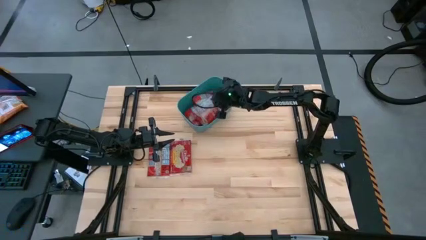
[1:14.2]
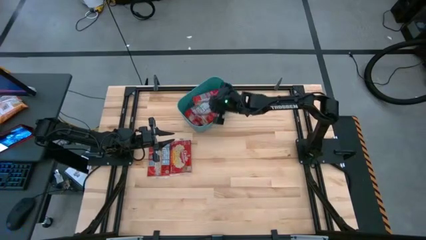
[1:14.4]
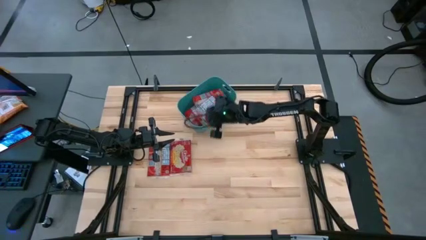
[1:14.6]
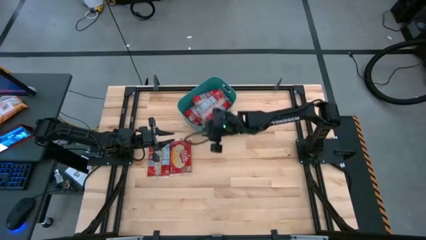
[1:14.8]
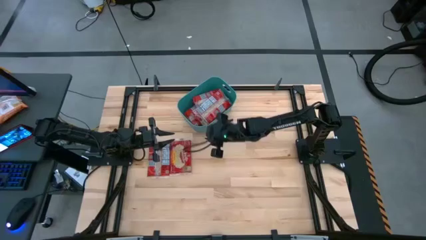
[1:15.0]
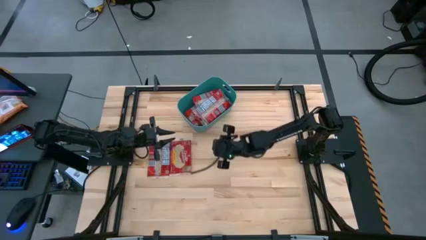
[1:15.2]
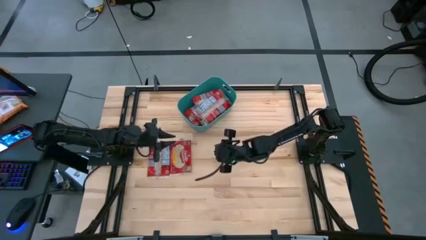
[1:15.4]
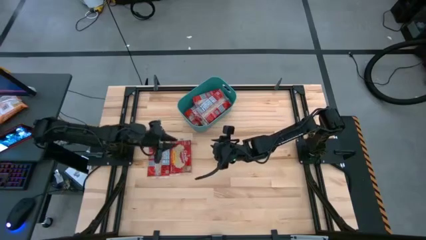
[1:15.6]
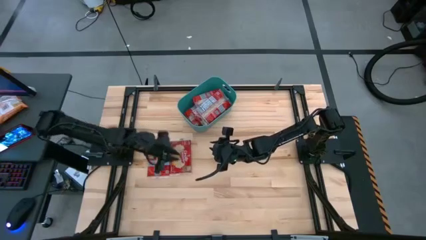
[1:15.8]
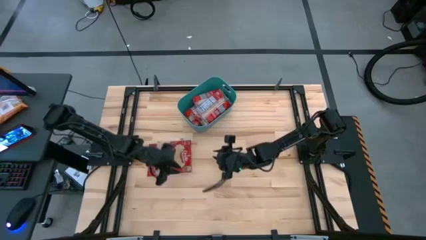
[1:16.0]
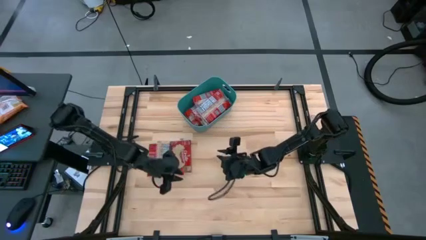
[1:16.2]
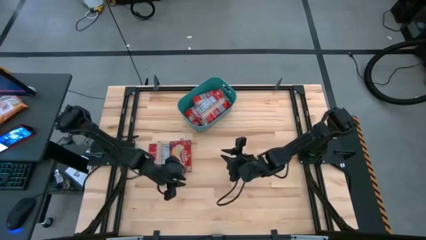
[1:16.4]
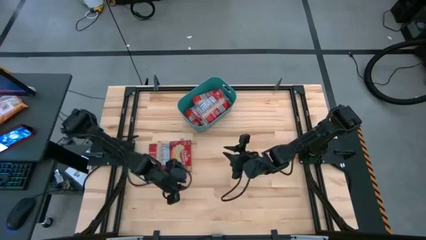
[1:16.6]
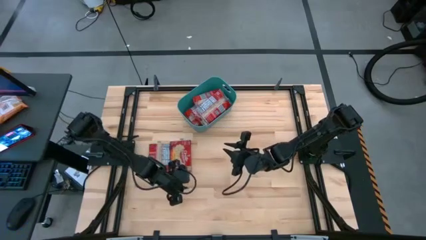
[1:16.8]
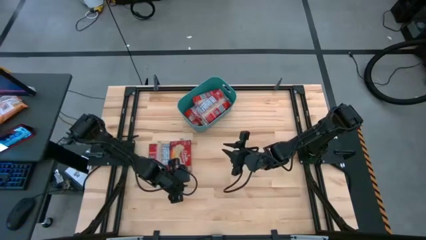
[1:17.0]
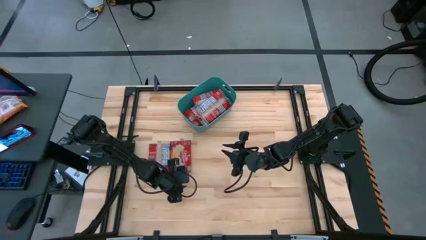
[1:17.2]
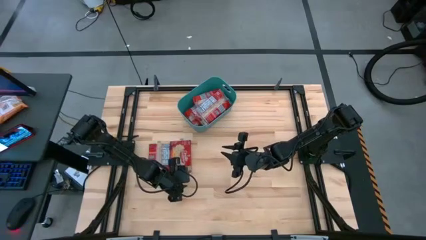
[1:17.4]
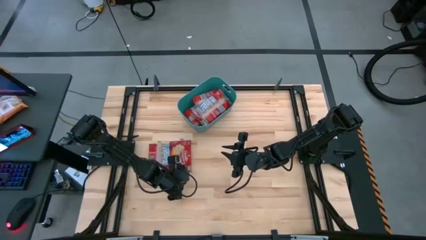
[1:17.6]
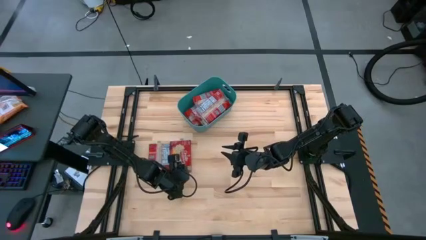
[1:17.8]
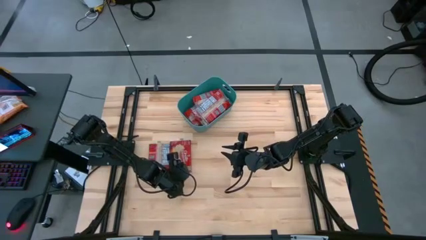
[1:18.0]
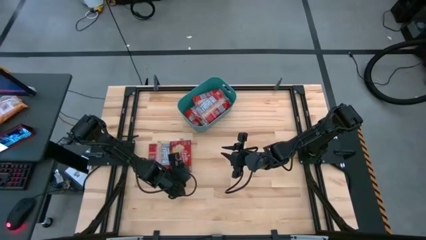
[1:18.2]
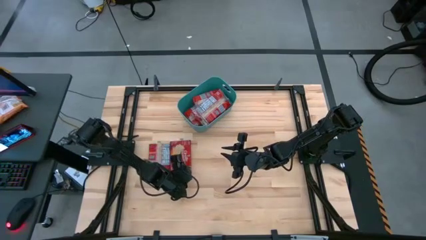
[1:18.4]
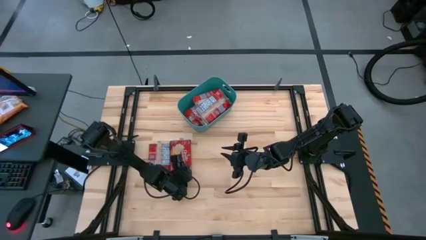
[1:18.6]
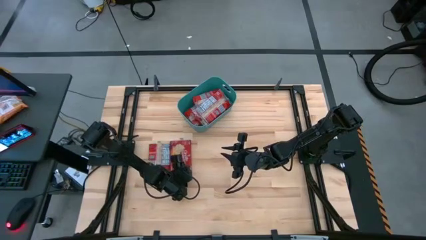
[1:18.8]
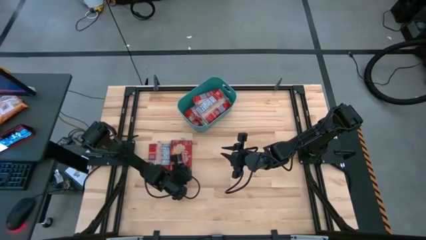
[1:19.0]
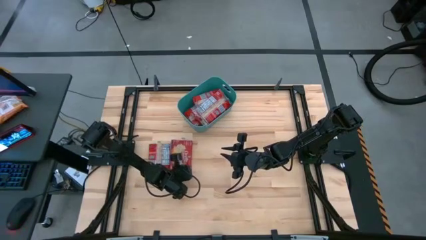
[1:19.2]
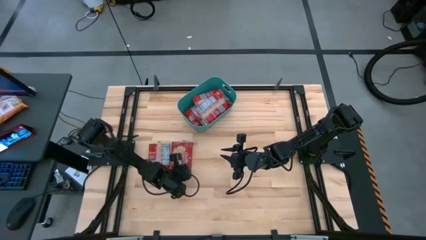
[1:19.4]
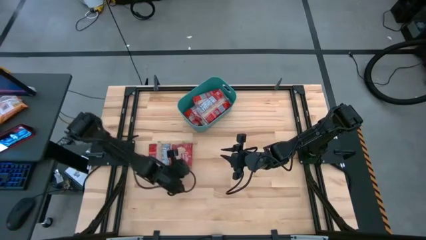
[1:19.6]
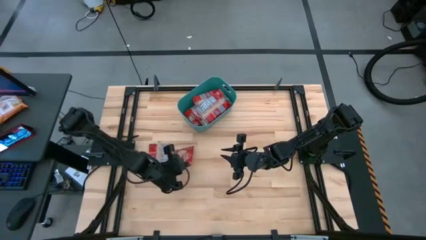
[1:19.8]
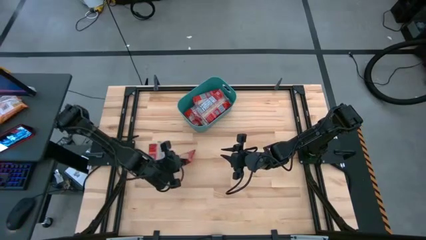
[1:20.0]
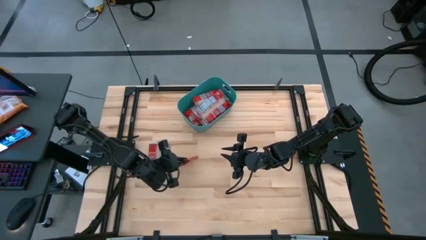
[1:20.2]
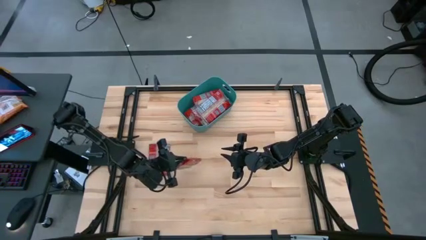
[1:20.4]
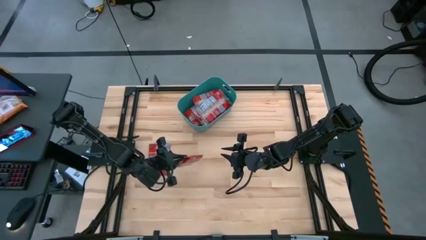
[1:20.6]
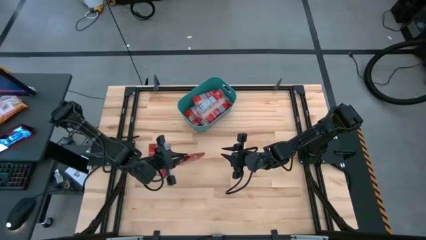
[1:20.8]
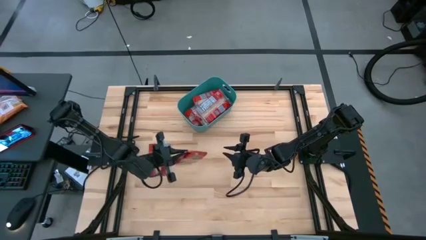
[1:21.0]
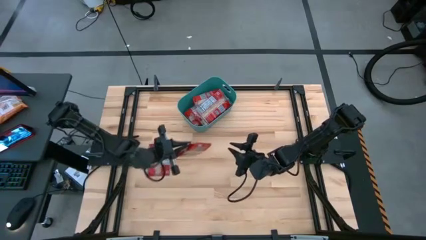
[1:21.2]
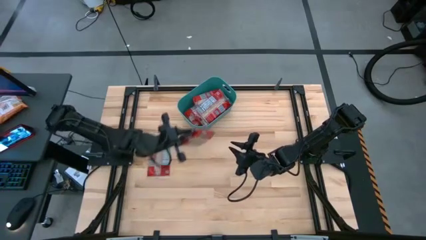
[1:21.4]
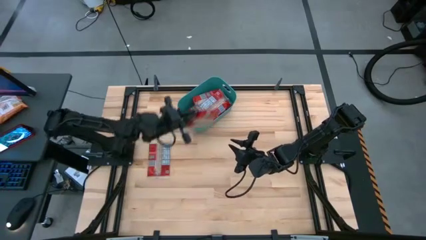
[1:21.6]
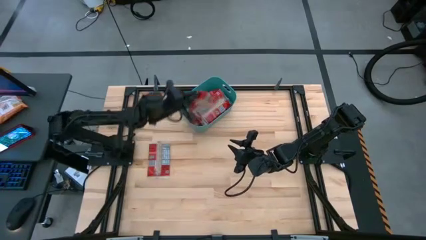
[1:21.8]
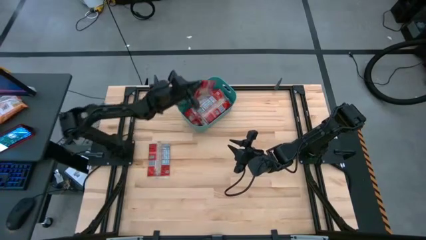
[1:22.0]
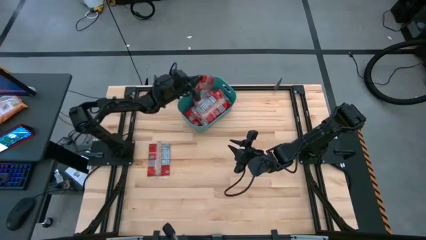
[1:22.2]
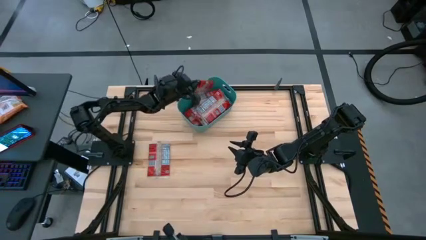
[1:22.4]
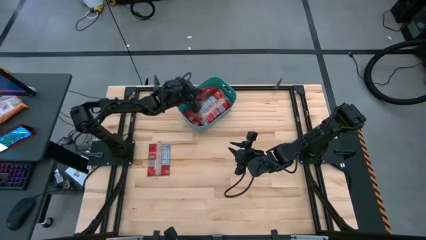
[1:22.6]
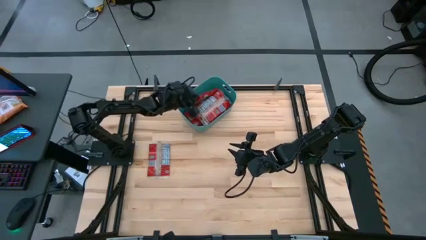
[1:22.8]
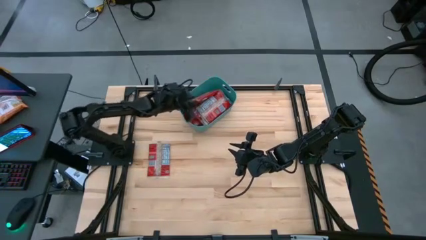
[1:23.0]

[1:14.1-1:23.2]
Task: Sort popcorn bags into baskets
Put the popcorn bag into the blue bin

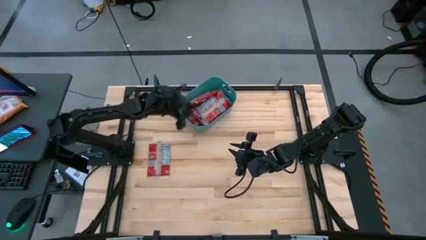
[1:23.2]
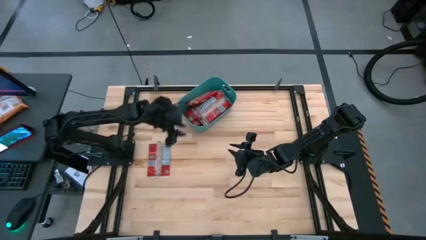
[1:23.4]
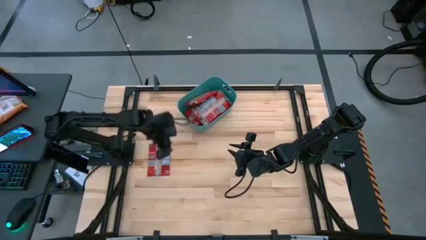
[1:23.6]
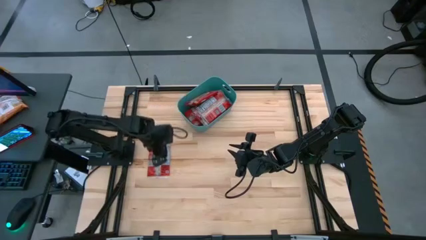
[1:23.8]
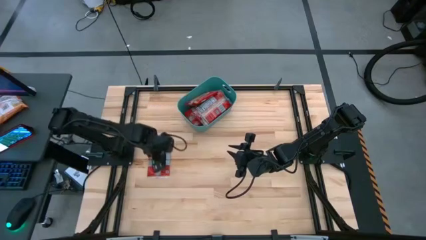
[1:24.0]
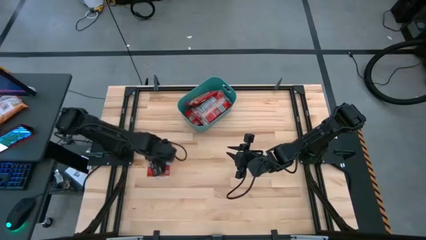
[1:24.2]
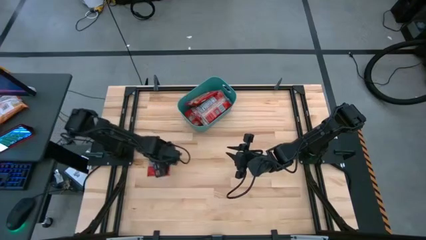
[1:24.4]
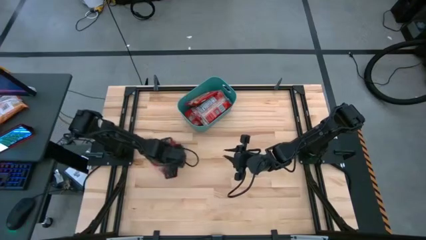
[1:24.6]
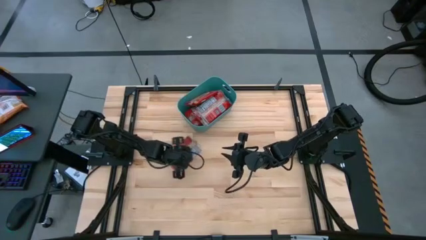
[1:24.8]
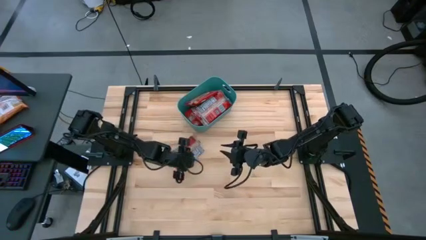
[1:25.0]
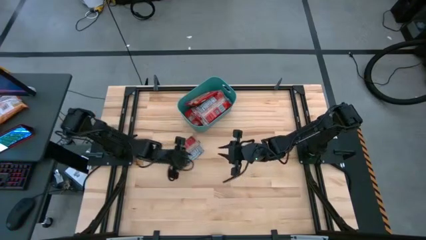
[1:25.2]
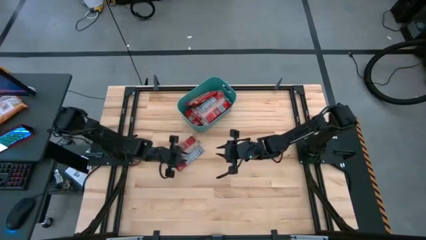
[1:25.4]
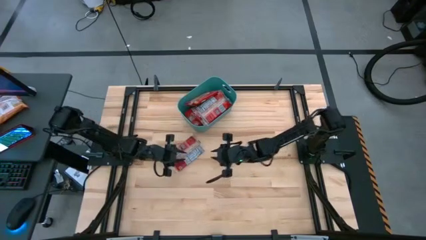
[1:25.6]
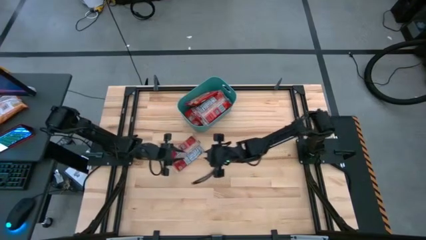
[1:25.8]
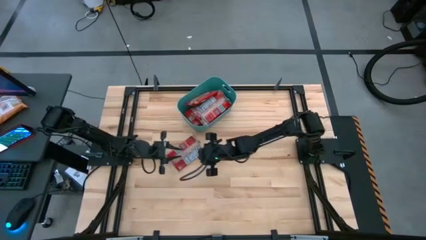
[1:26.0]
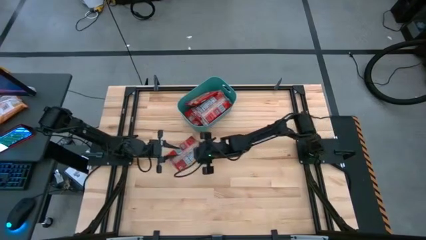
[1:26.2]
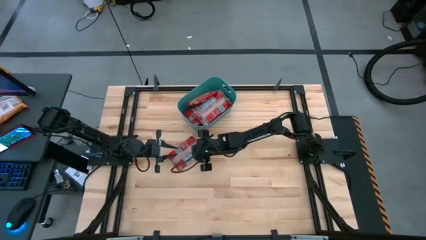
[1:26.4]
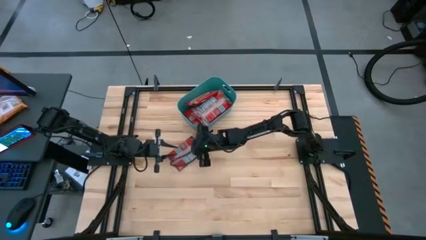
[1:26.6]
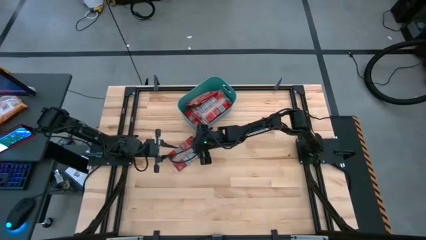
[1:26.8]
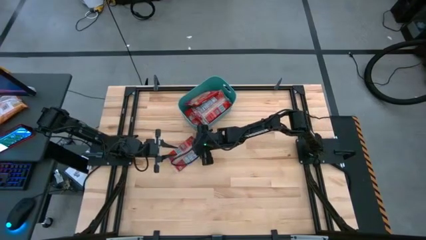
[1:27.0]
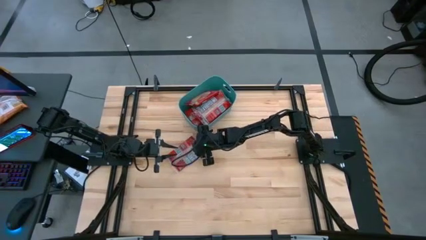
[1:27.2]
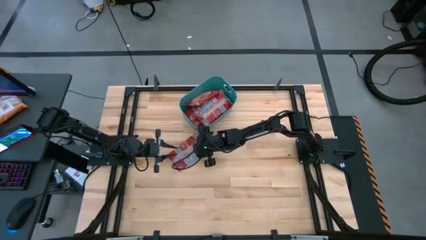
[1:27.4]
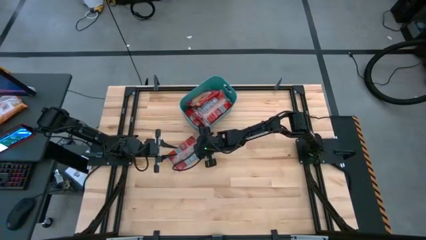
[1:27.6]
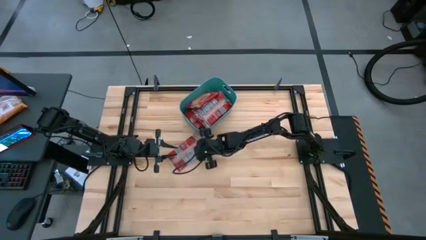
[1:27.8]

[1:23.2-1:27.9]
Put the popcorn bag into the blue bin

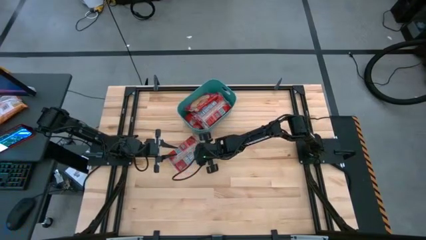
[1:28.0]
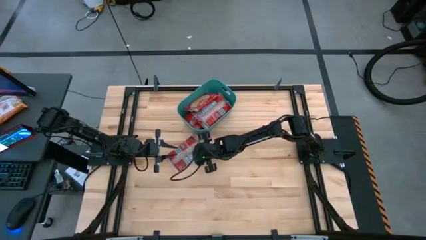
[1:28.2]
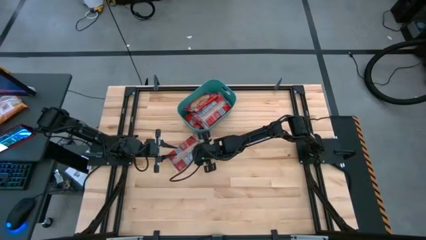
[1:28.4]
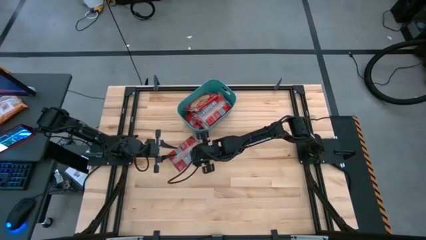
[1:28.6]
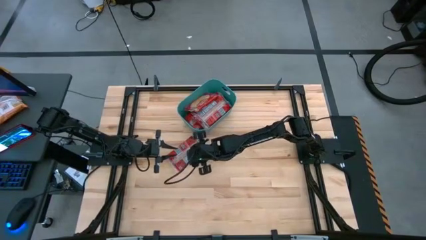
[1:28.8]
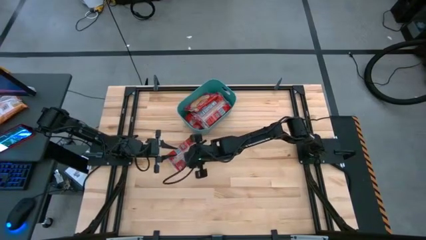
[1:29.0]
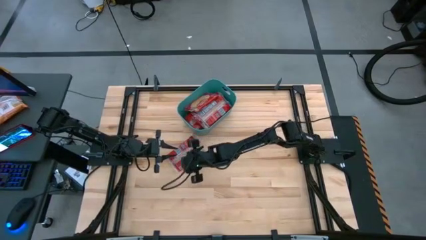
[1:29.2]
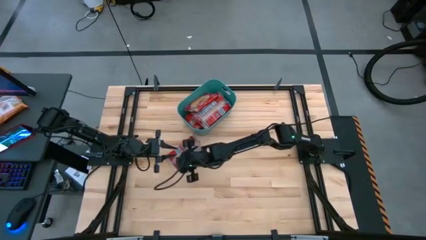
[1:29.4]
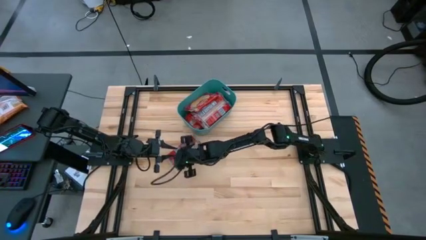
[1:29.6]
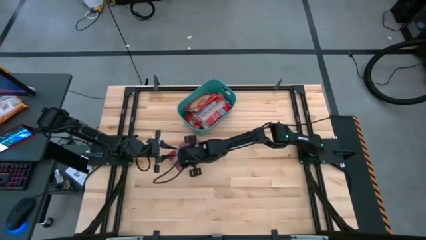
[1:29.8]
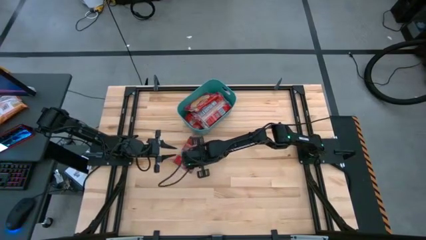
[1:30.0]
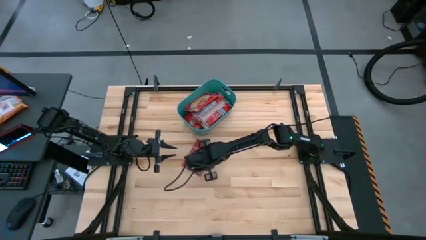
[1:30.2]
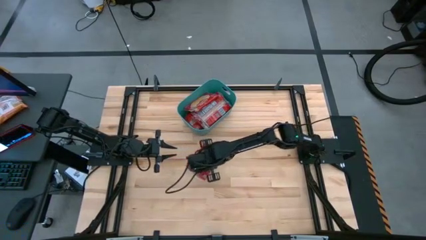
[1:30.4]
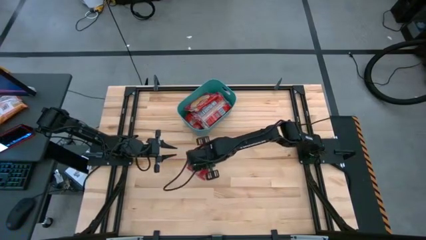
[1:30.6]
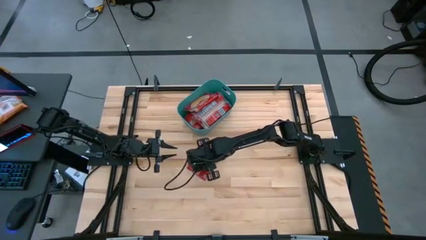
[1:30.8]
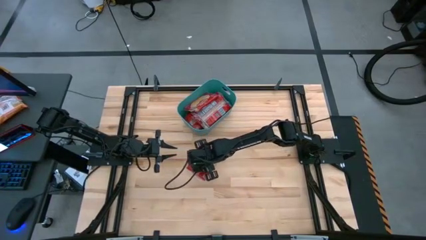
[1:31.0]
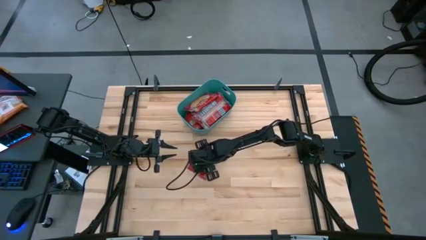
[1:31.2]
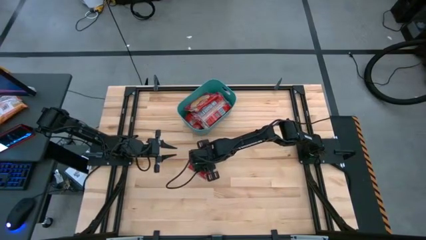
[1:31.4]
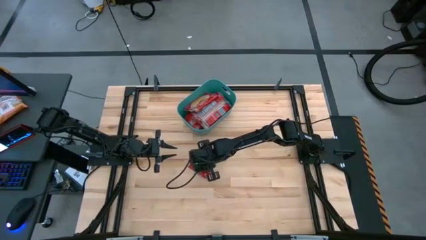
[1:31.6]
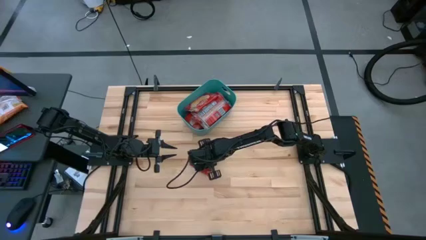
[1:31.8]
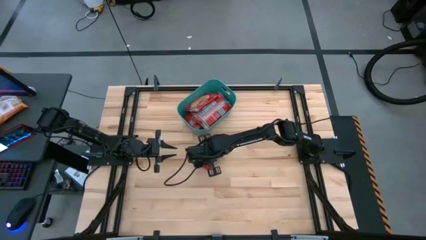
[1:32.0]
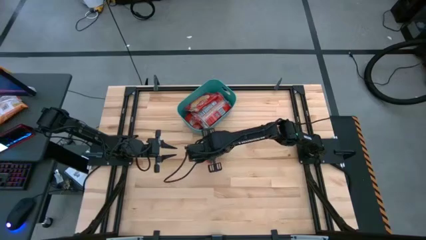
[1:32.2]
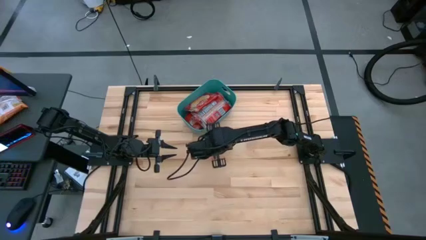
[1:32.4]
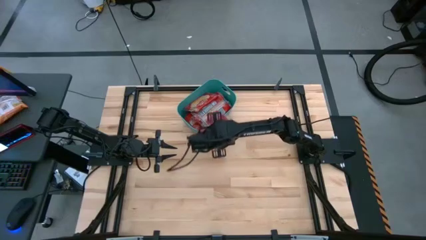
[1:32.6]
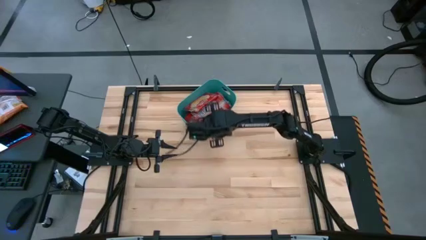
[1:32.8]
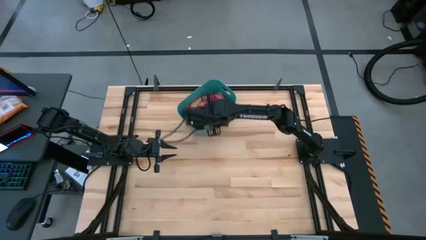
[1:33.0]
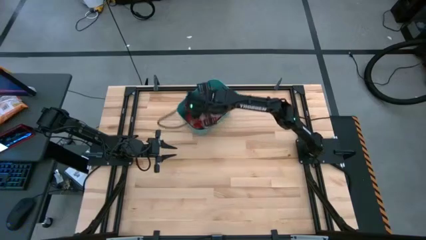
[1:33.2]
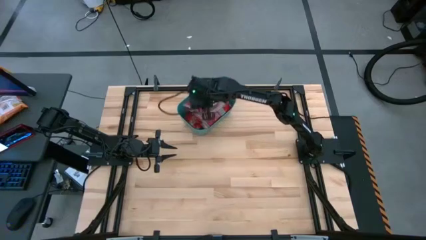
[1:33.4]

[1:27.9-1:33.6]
Put the popcorn bag into the blue bin
